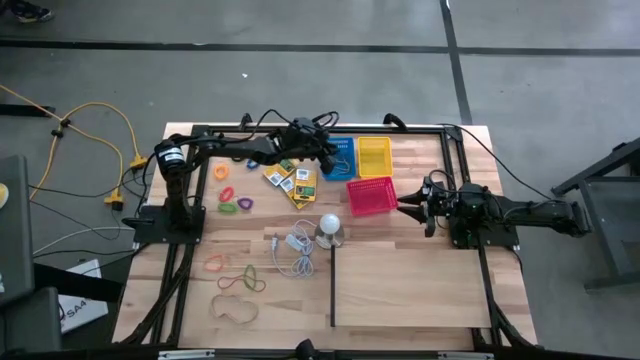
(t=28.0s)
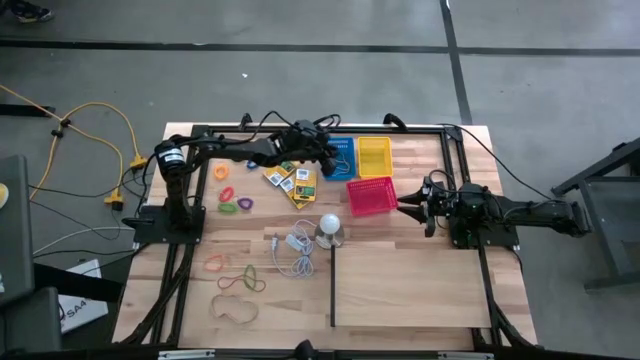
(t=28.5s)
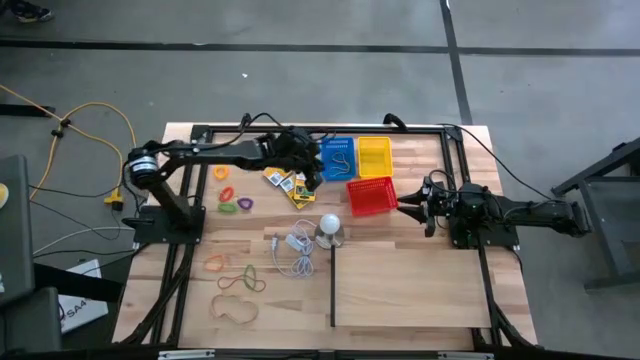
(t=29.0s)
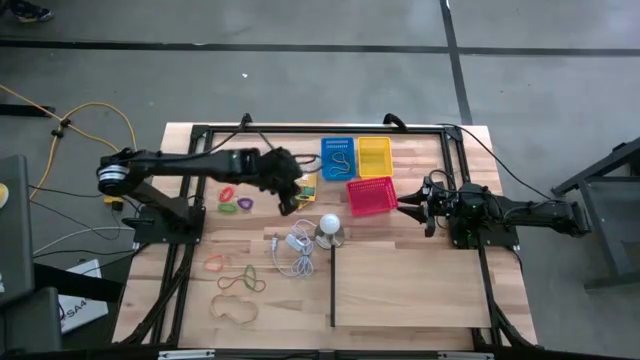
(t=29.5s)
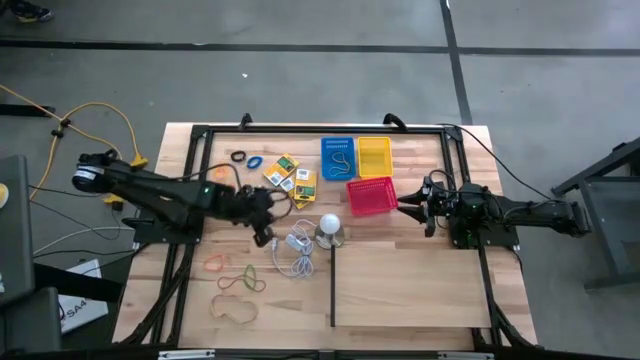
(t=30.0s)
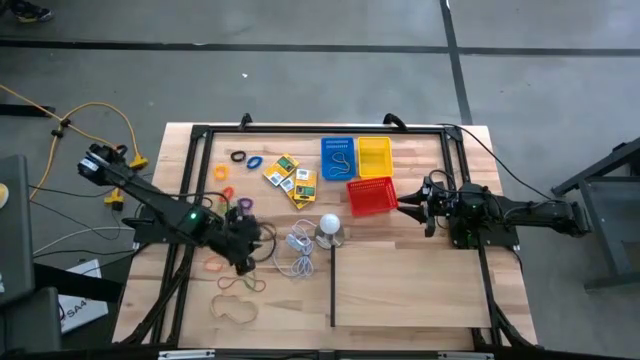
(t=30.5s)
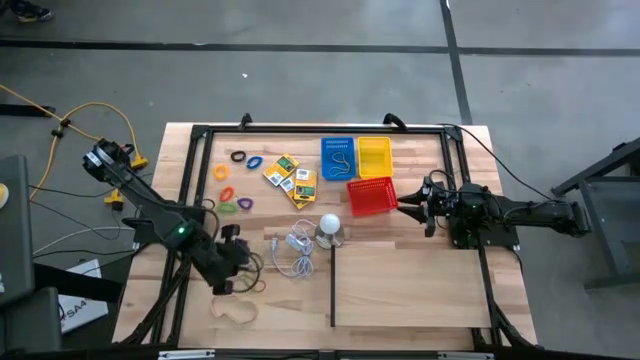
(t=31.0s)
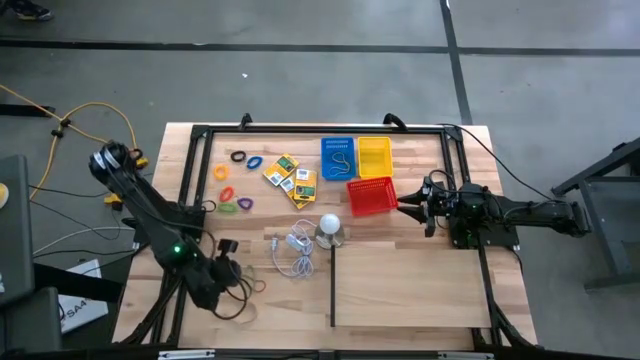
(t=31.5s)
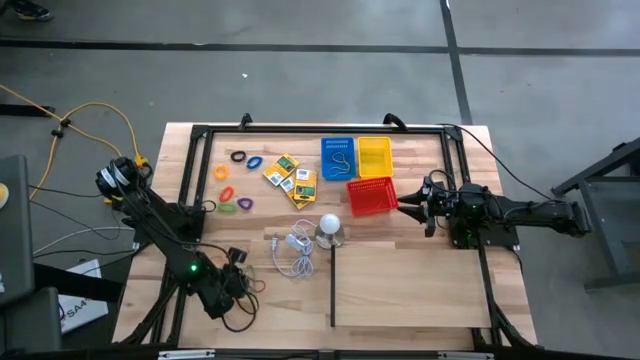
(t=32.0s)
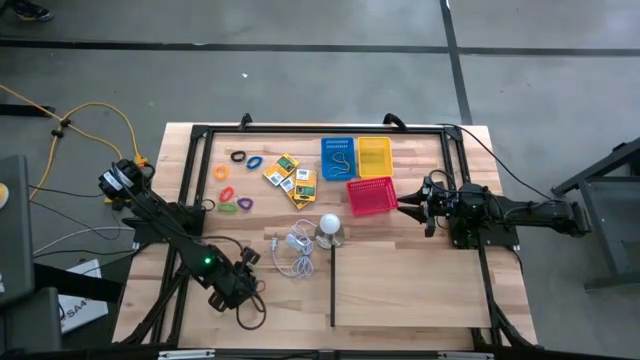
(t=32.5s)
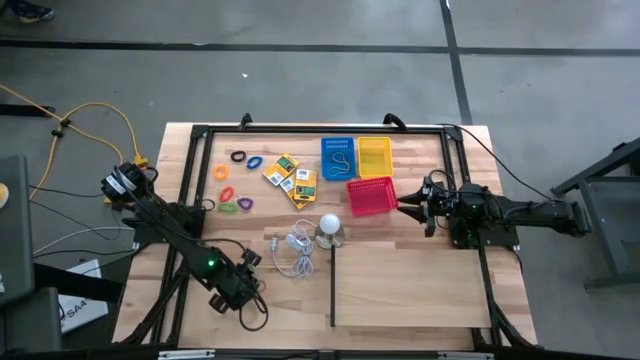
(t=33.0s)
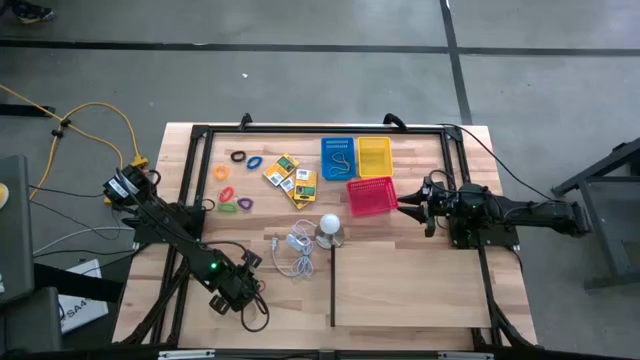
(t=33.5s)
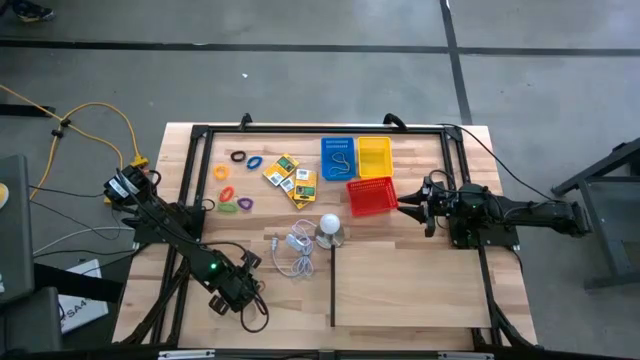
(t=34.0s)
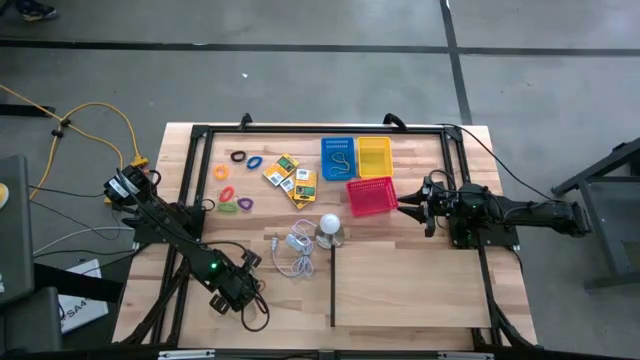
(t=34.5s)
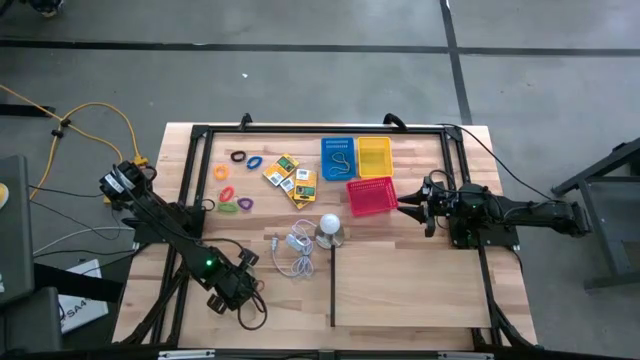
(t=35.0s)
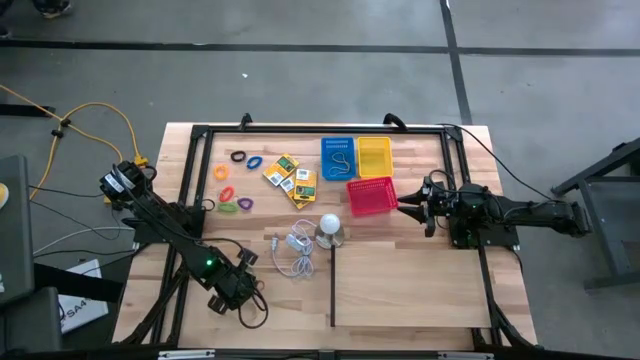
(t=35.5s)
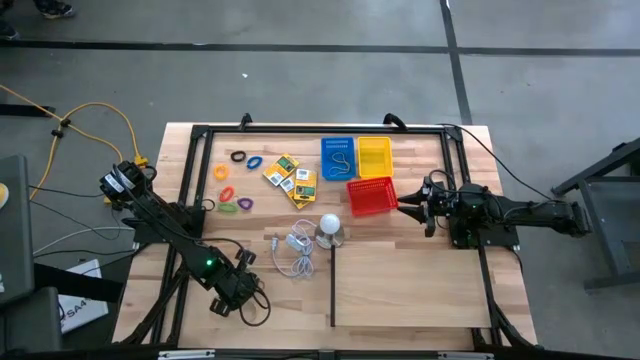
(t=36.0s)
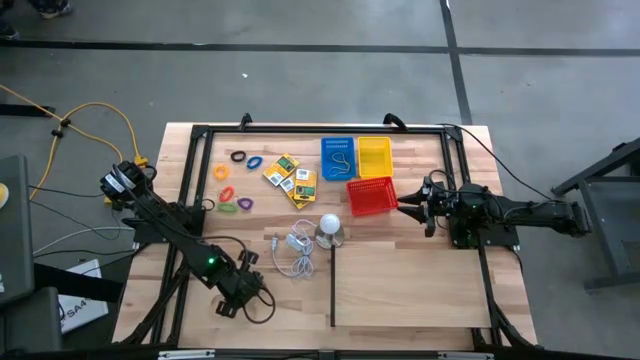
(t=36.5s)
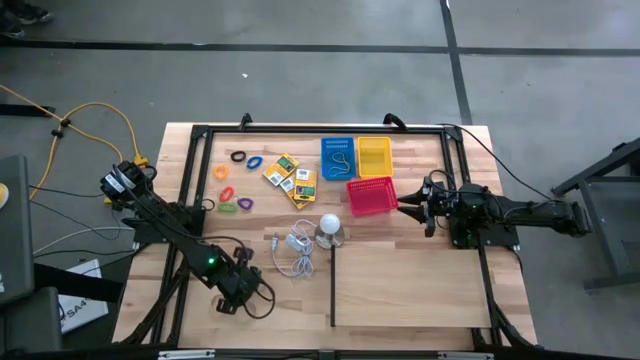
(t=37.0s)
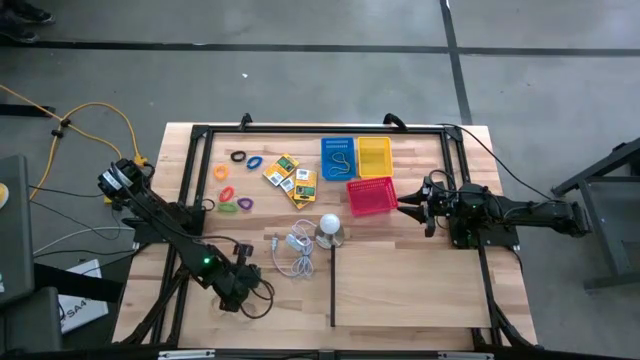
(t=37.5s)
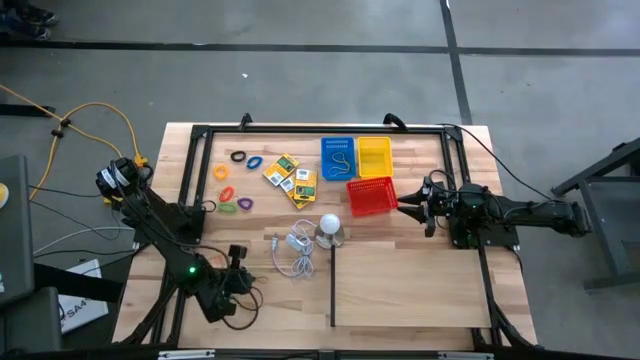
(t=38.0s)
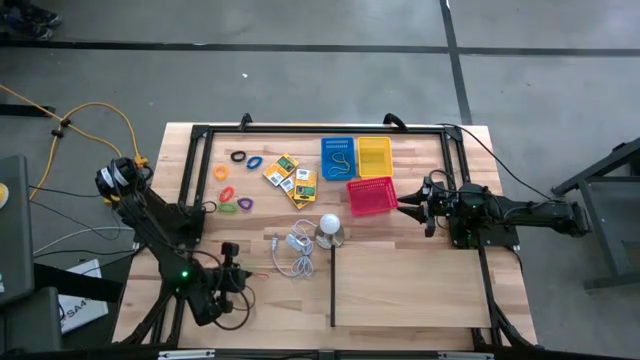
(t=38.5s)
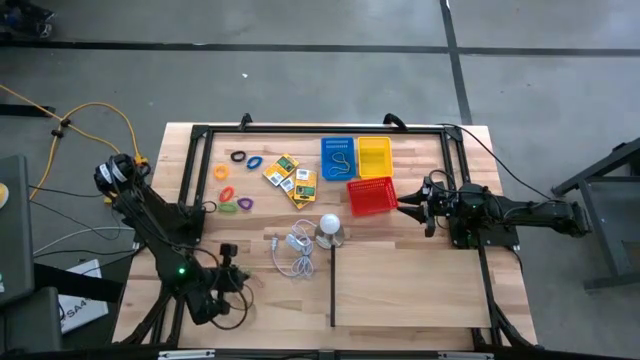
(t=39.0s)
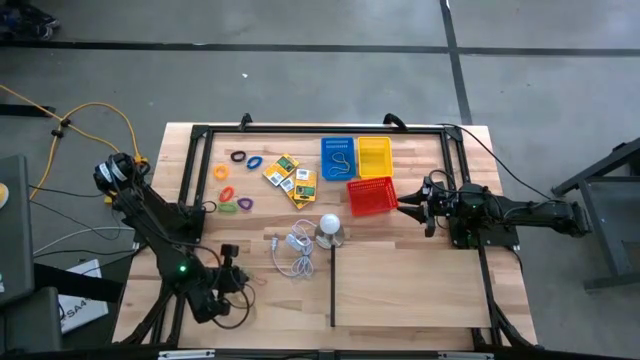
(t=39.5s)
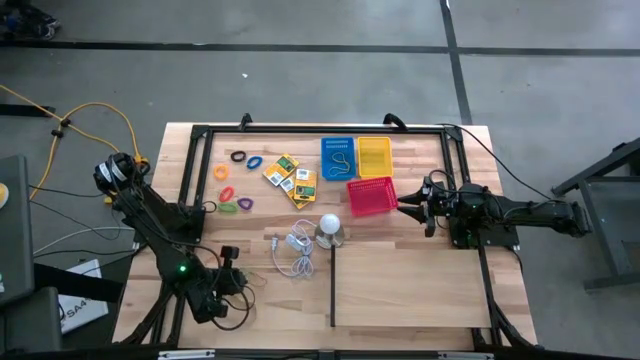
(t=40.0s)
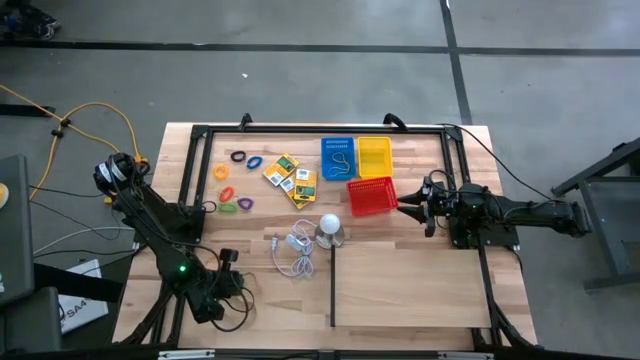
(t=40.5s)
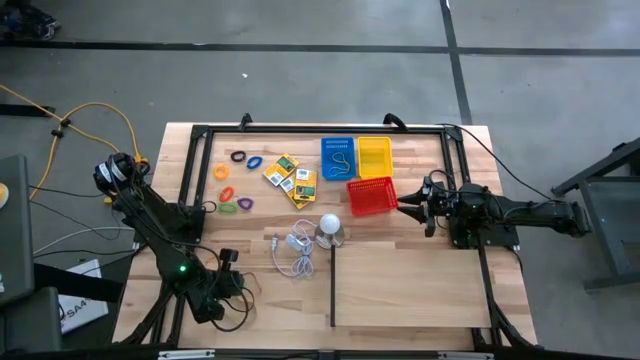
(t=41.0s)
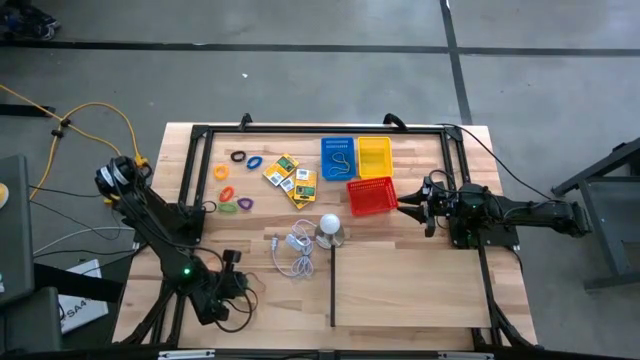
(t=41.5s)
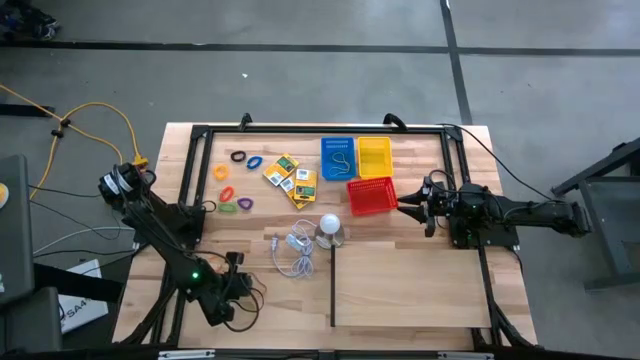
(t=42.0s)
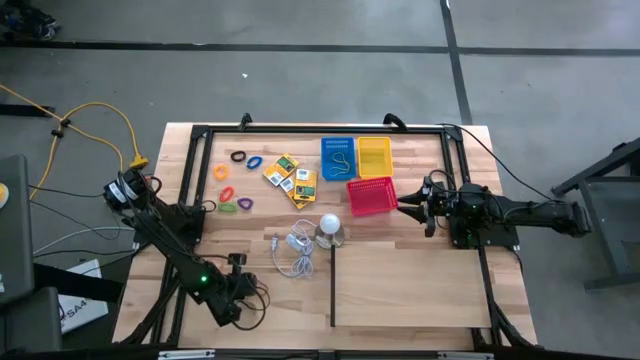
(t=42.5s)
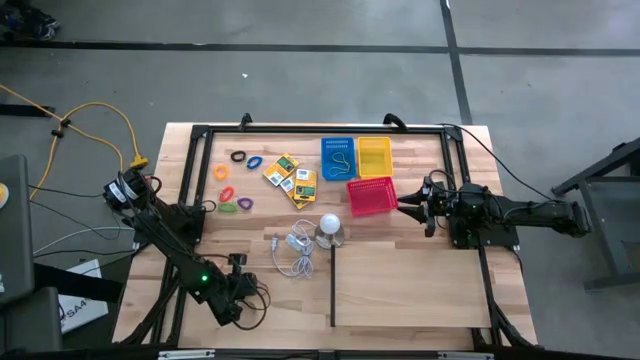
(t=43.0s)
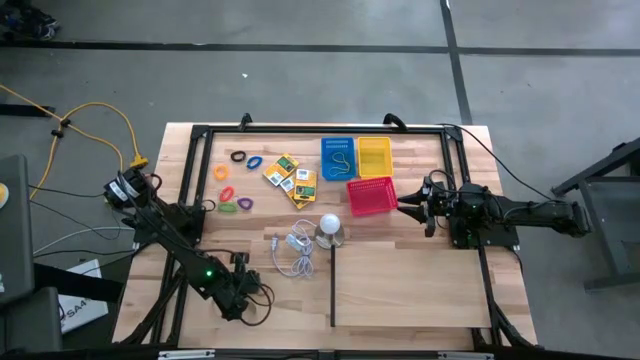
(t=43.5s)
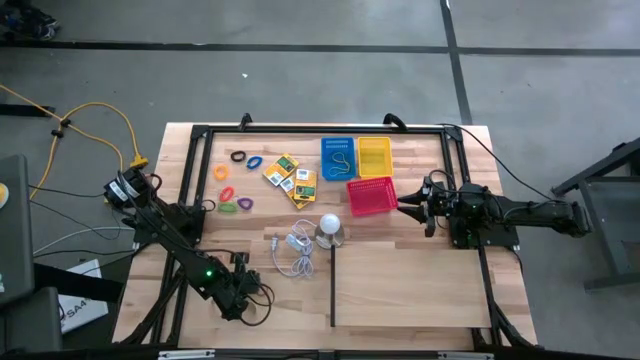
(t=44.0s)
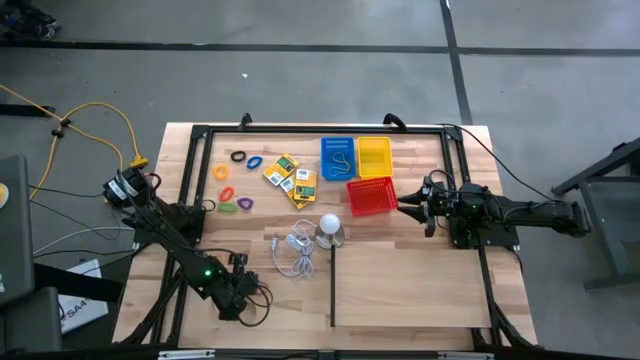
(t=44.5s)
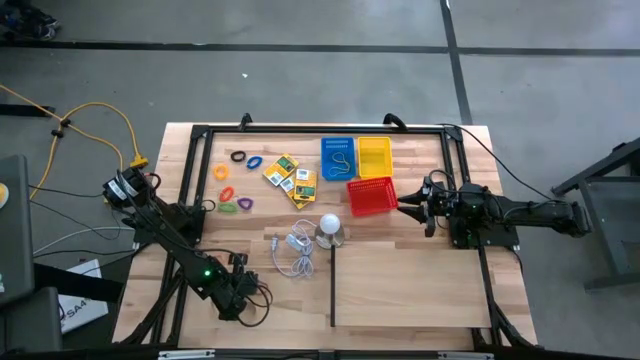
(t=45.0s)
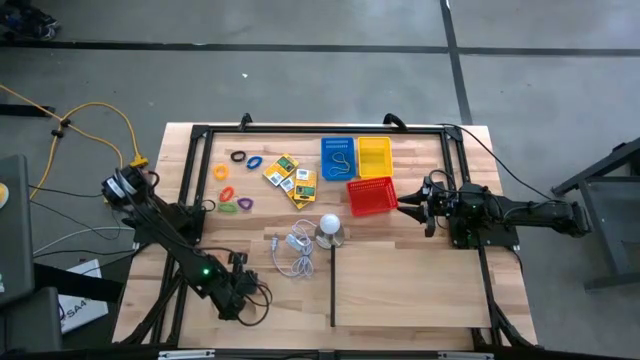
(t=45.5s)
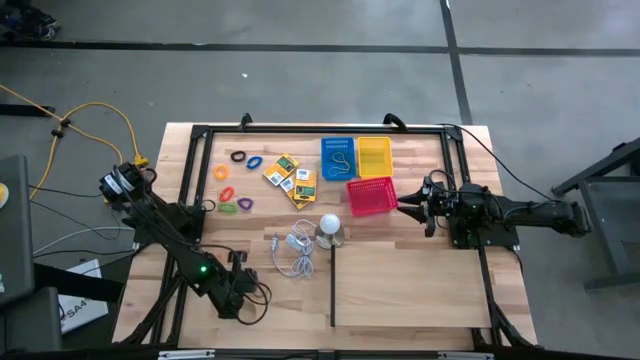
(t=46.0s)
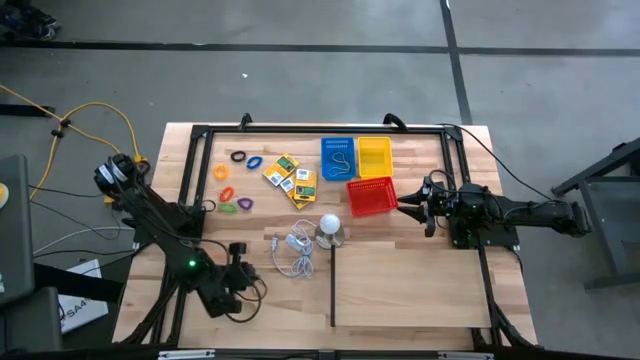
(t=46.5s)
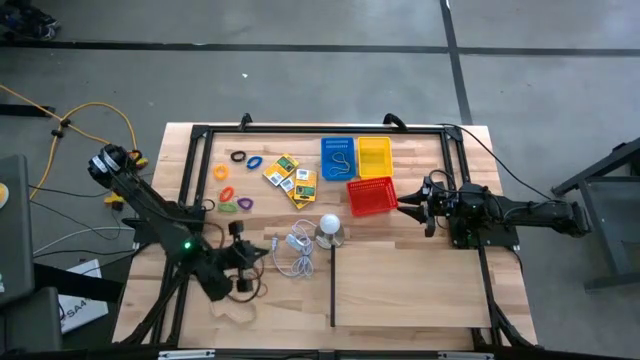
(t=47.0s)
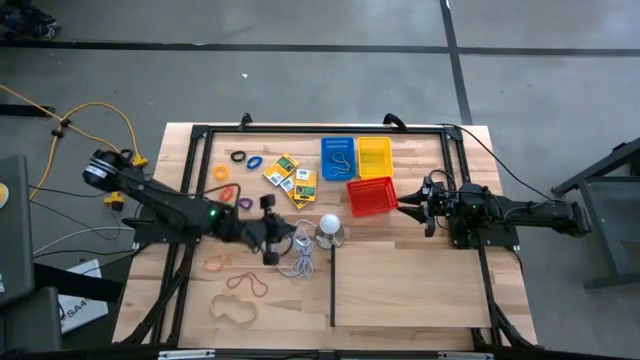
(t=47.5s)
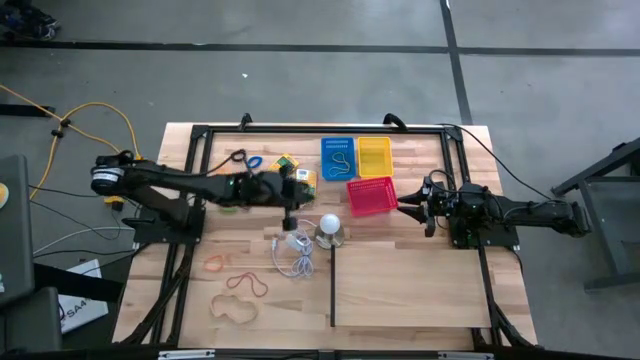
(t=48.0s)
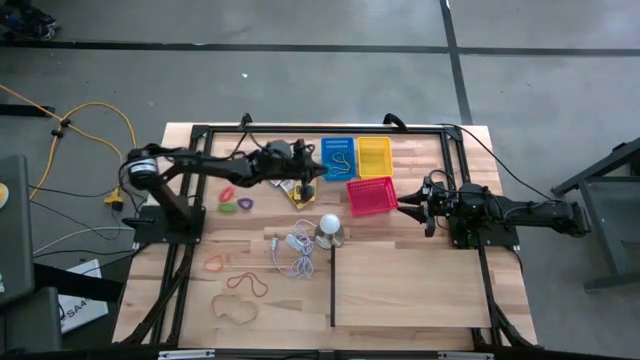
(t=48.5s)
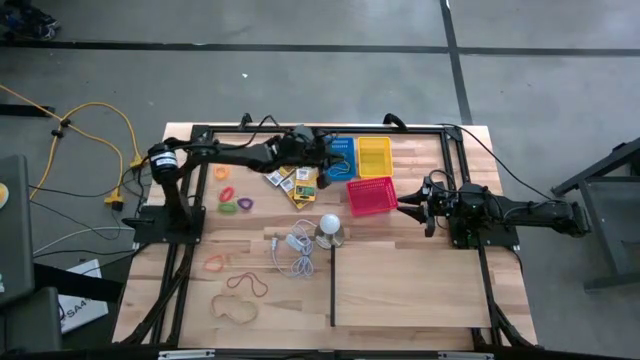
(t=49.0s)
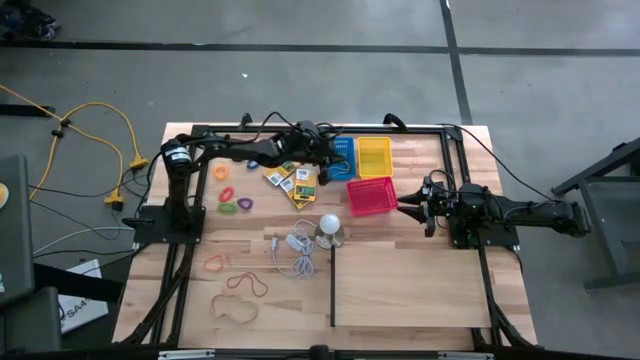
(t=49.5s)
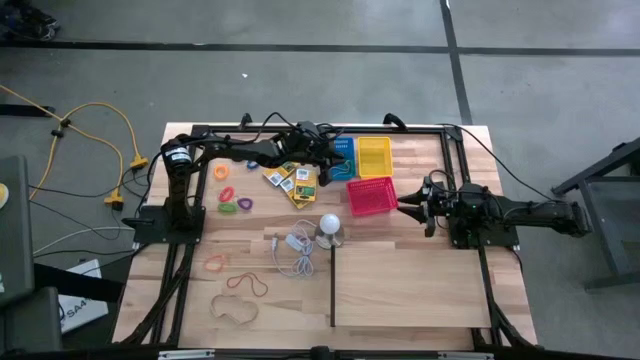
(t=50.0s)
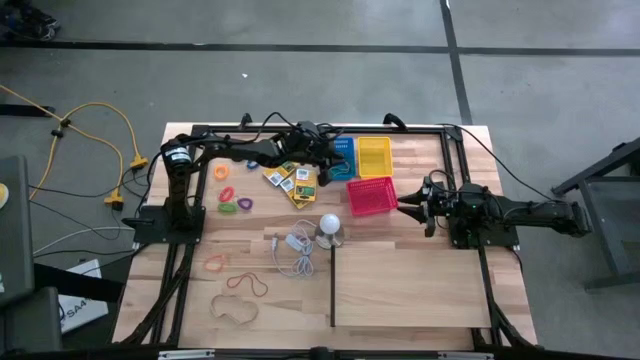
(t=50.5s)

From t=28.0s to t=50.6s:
Task: Pick & Place Office Desk Supplies
Put the green rubber band into the blue bin
